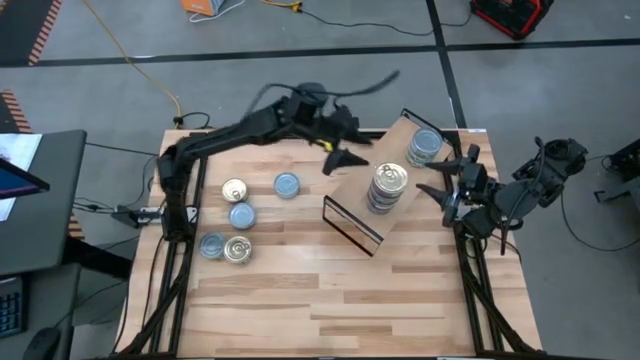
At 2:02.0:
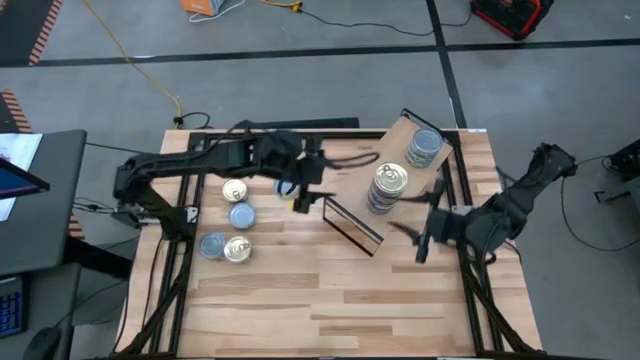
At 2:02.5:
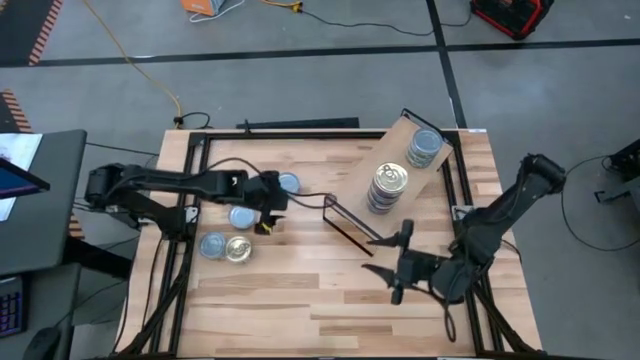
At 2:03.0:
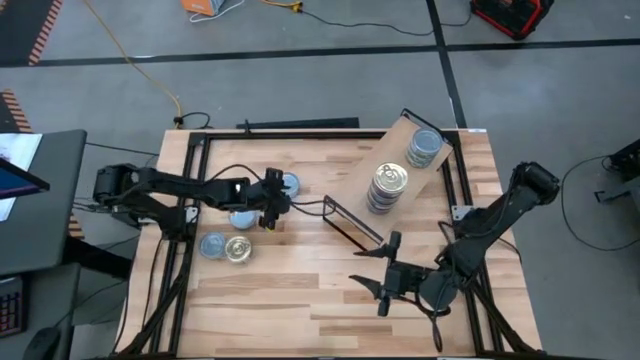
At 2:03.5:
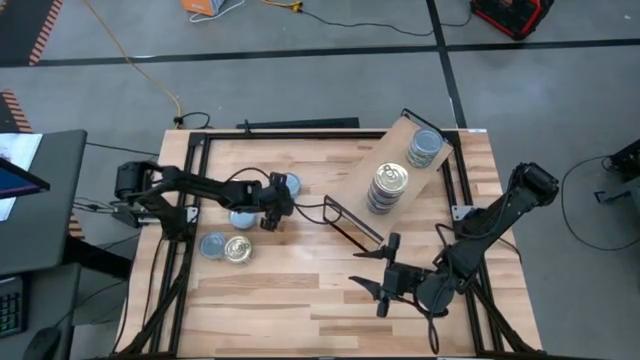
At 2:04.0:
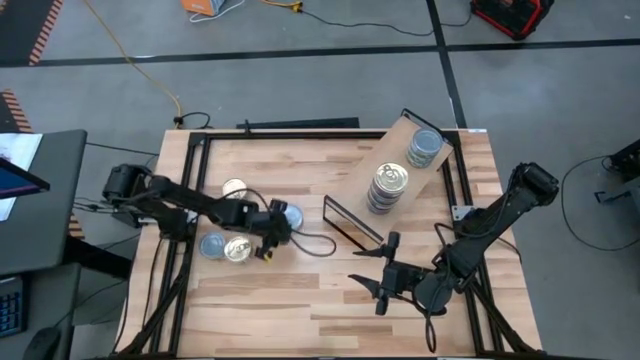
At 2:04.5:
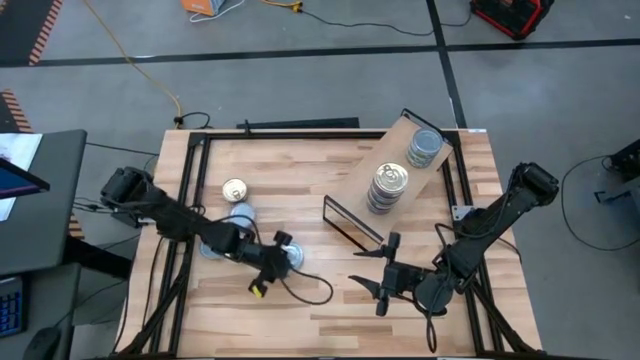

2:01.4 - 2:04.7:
Task: Stack canned seafood by type on shelf
Move the green tuna can to the center of the table

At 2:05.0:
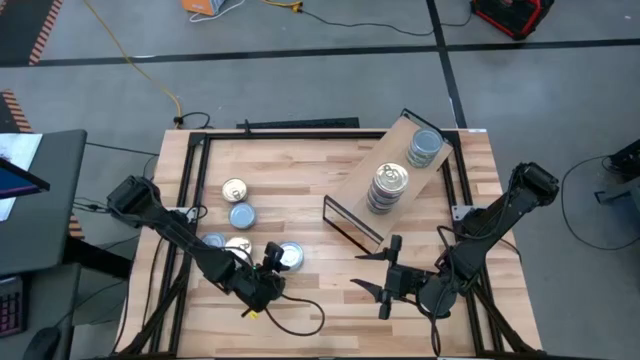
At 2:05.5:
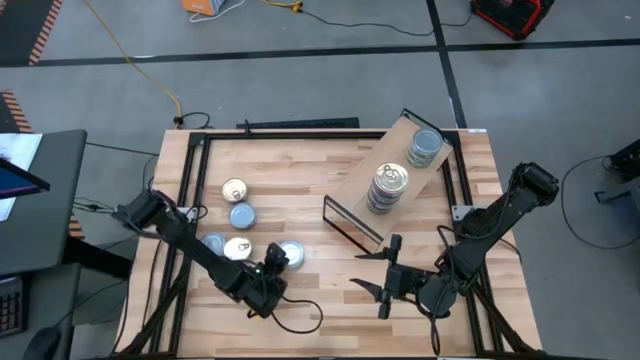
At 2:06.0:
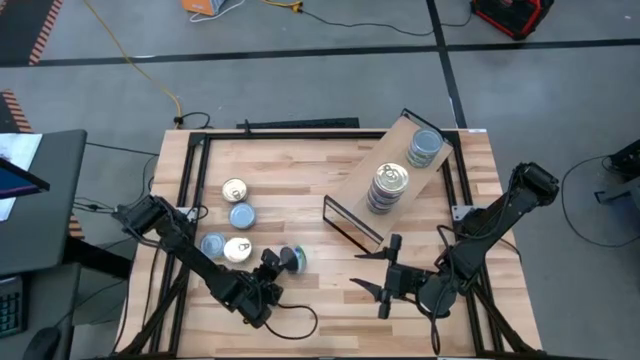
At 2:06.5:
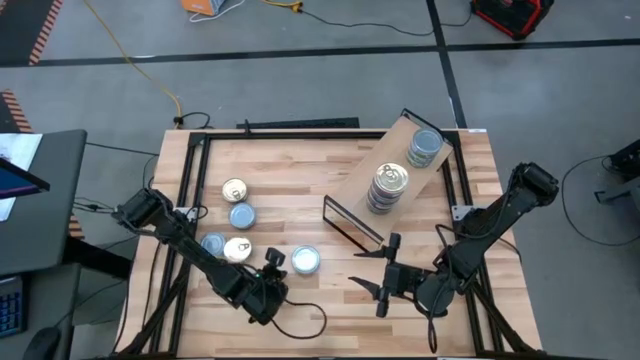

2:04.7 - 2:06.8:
Stack the green tuna can on the shelf

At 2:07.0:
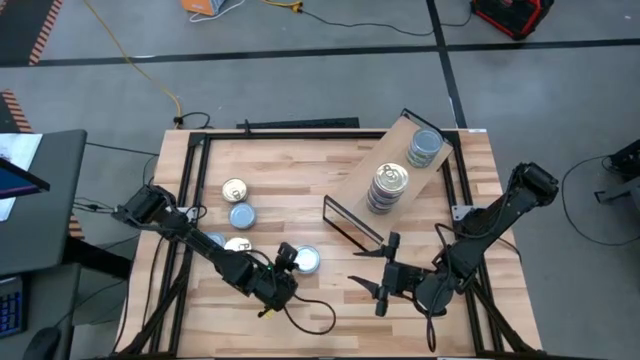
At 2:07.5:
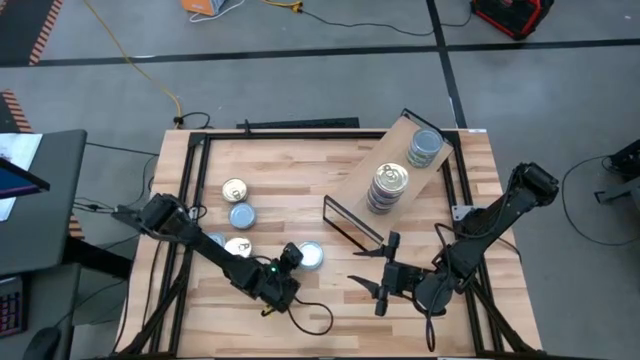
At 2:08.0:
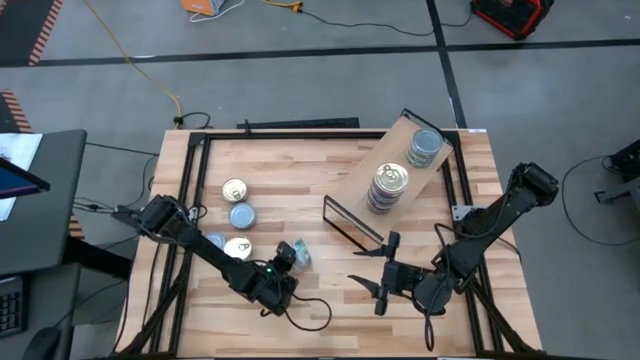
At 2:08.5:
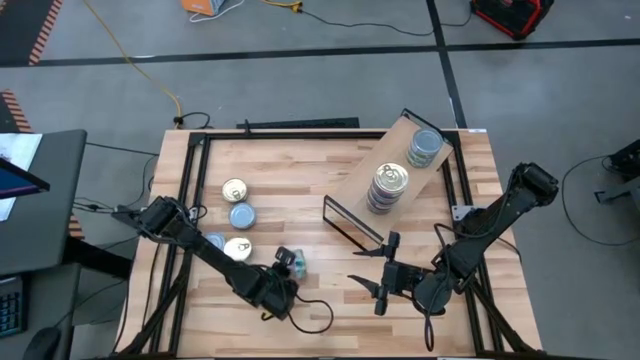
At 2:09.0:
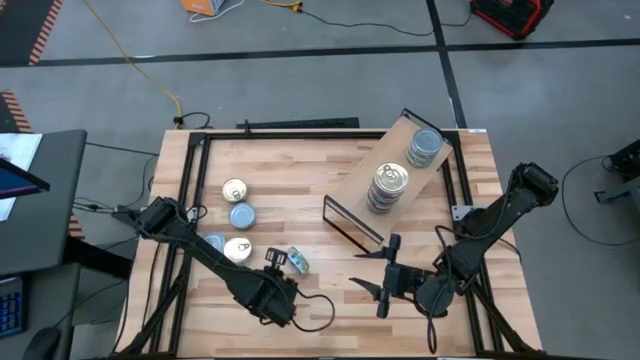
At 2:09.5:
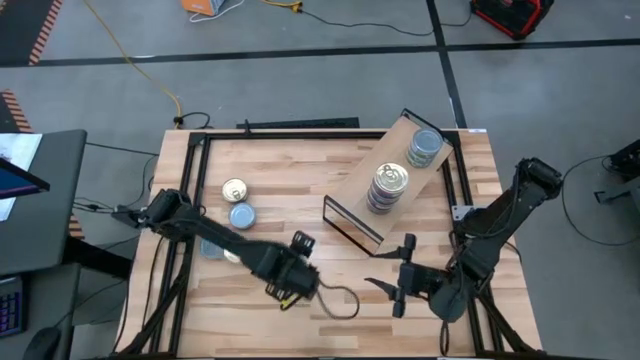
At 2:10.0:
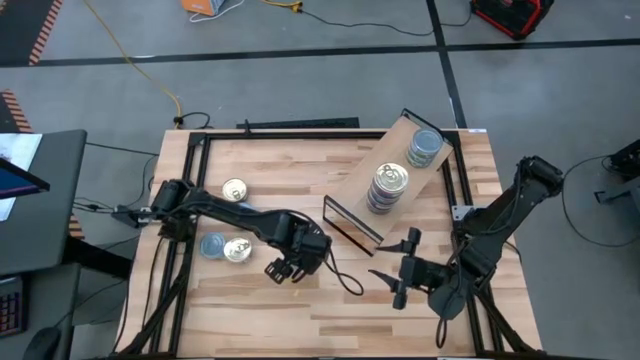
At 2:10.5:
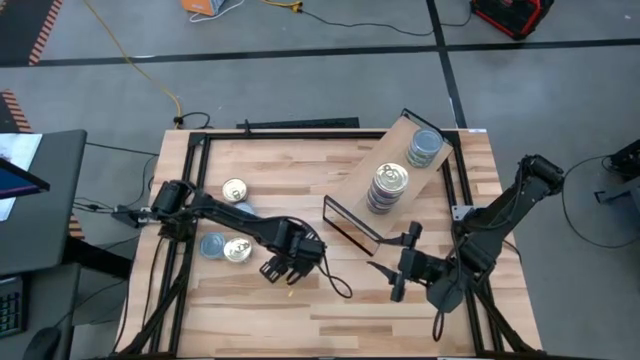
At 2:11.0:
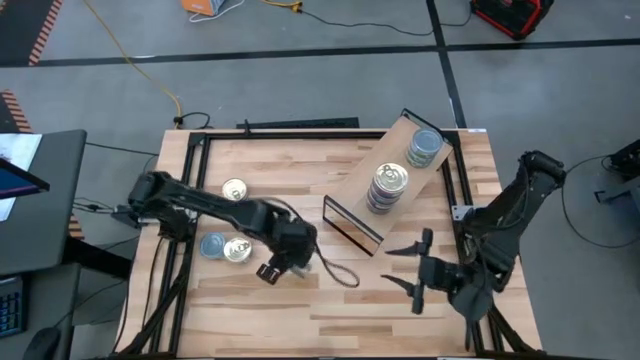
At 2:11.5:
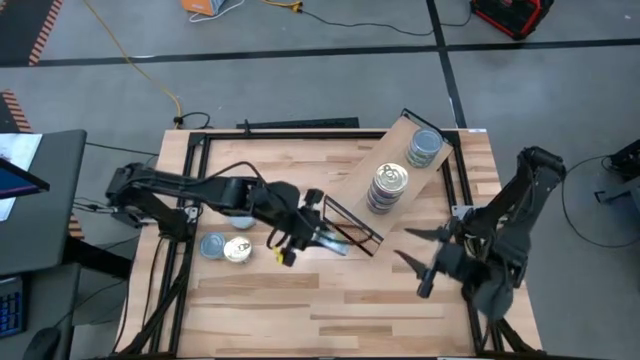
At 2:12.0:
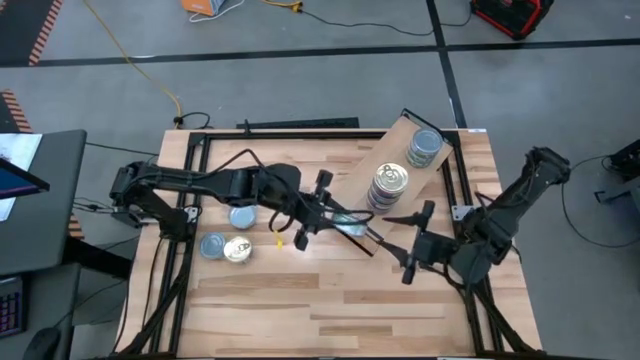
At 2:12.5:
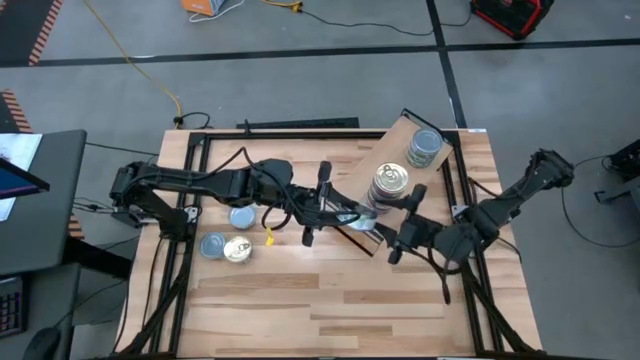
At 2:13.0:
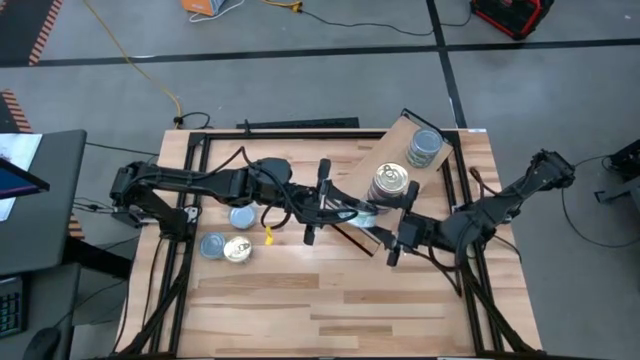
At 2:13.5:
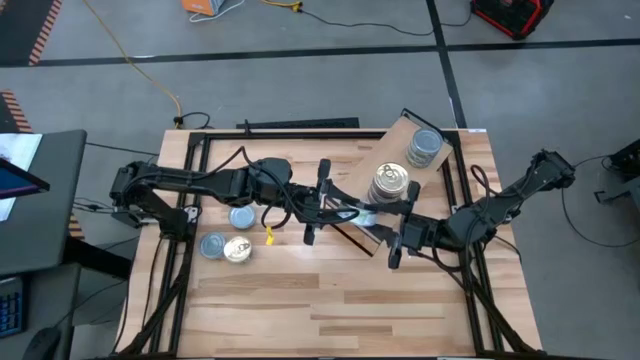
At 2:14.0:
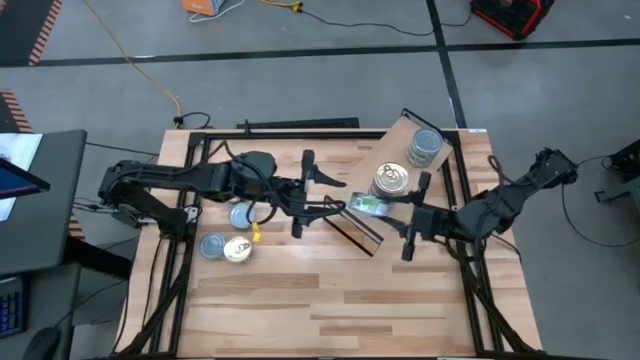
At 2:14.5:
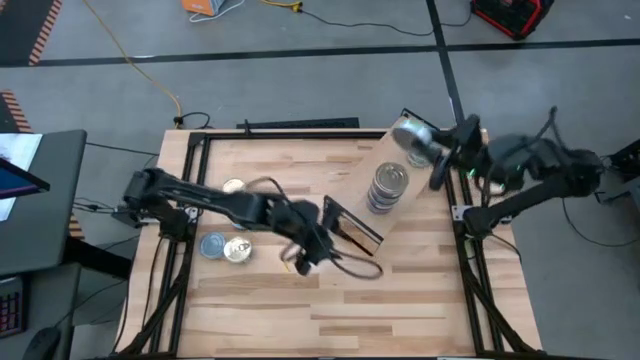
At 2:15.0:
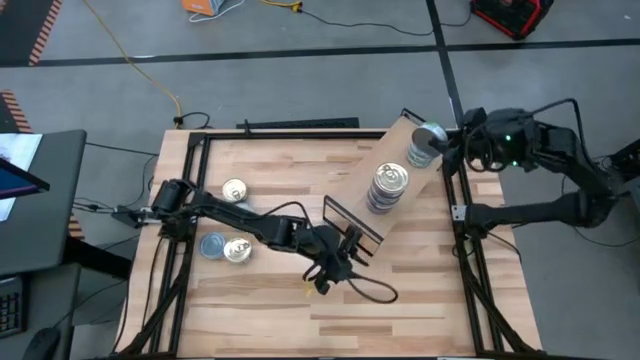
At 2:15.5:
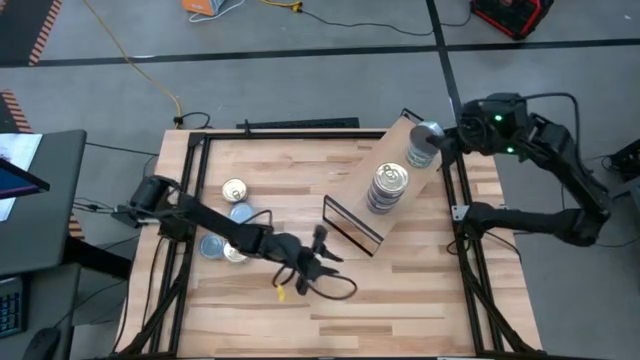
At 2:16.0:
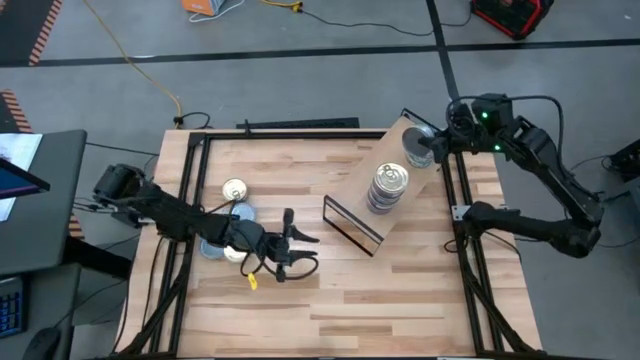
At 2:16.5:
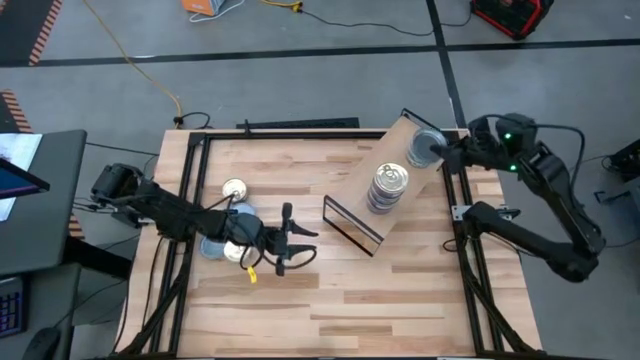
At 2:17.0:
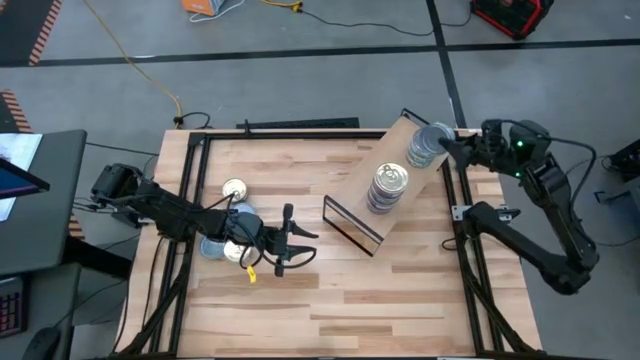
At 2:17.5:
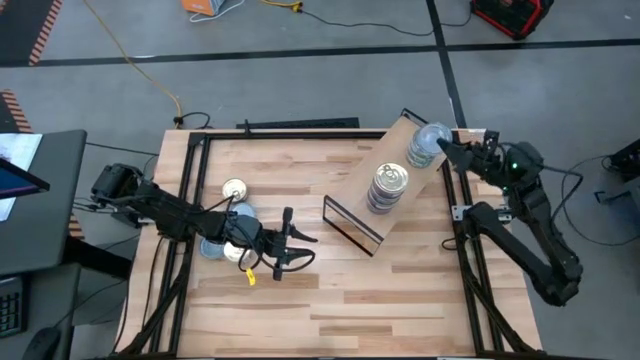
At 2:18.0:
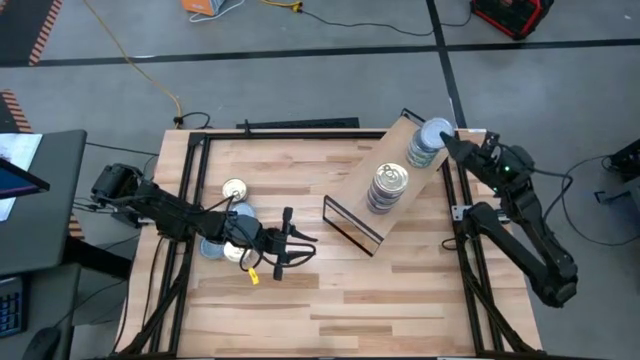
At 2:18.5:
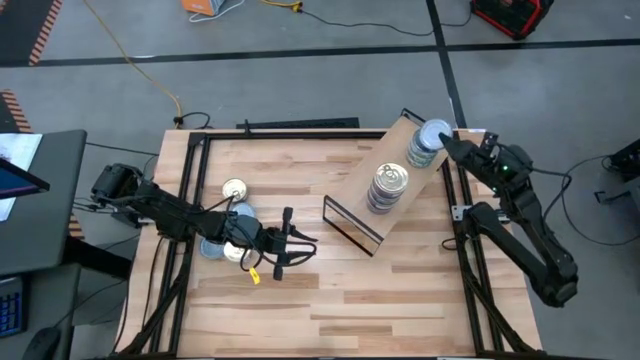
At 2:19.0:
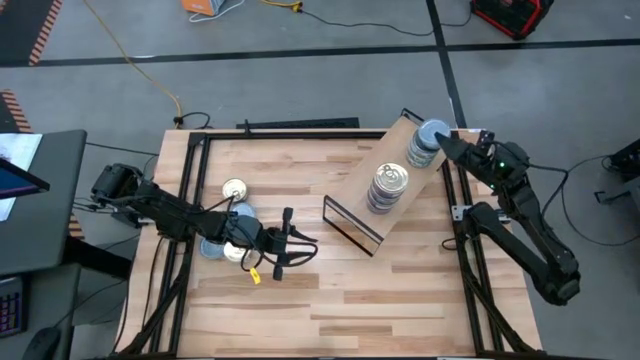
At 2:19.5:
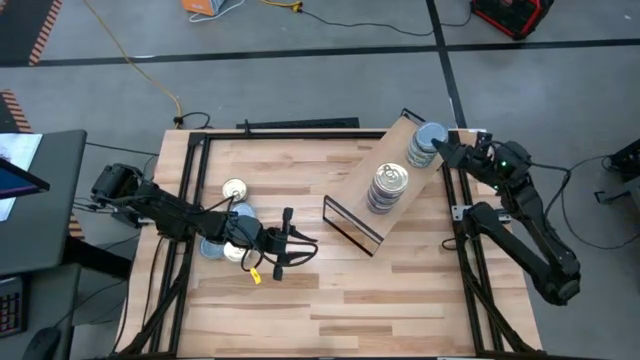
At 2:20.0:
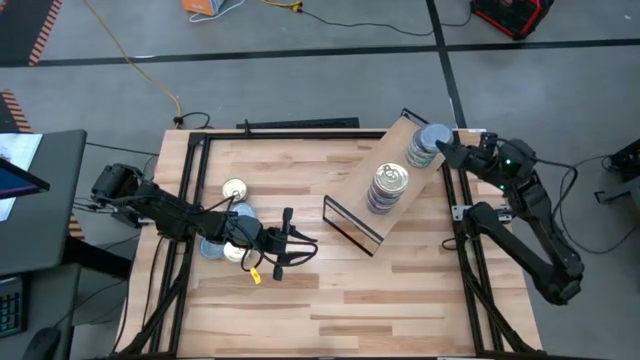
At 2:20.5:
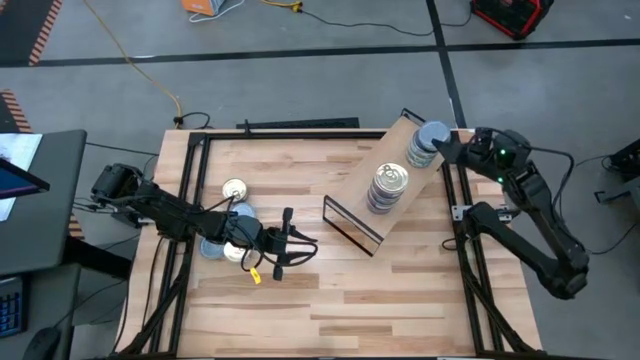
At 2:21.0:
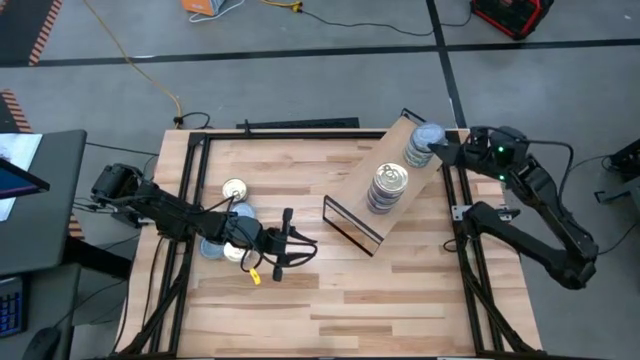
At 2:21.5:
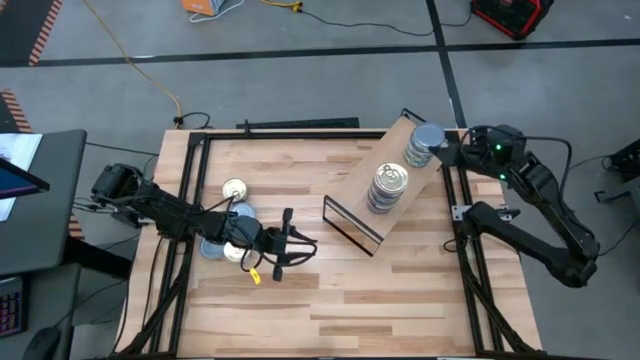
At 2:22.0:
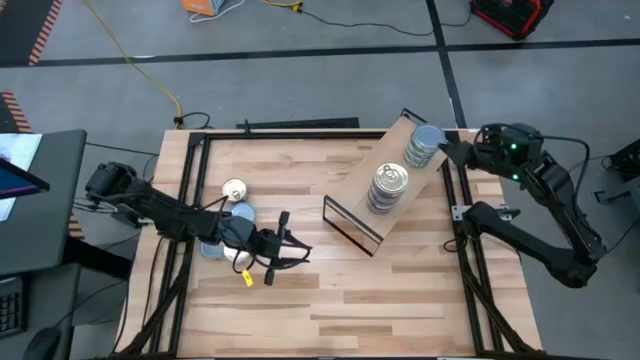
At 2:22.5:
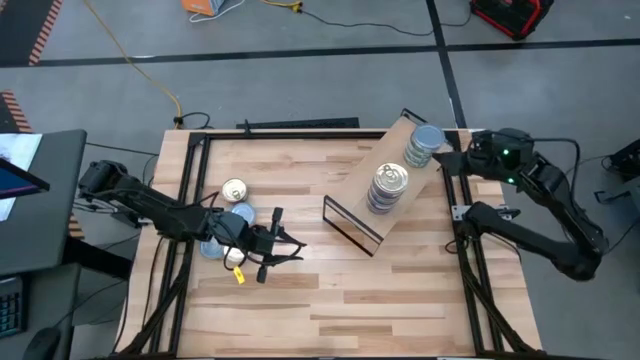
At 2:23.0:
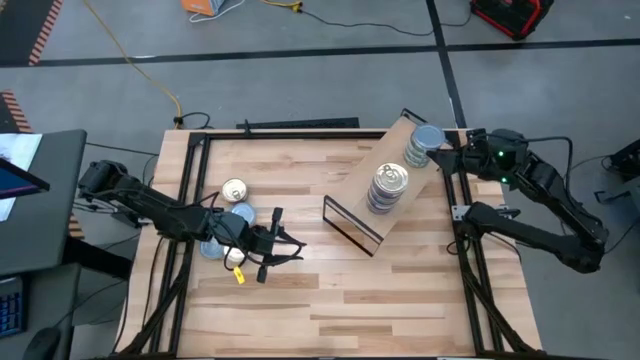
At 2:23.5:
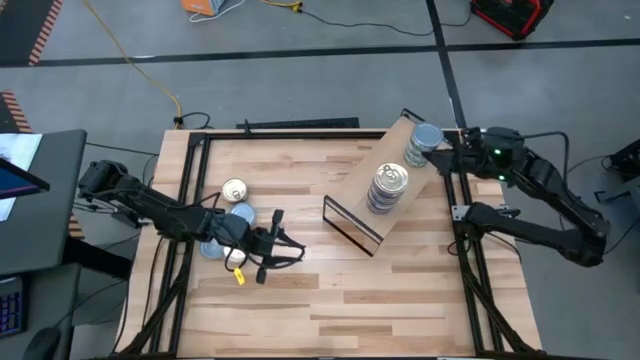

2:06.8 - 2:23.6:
Stack the green tuna can on the shelf
